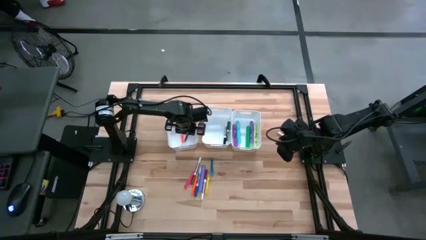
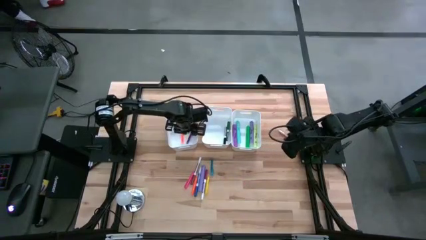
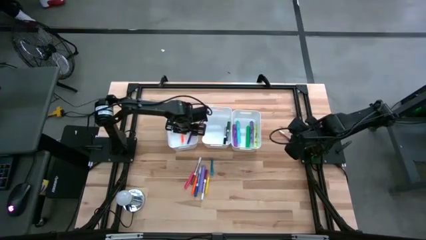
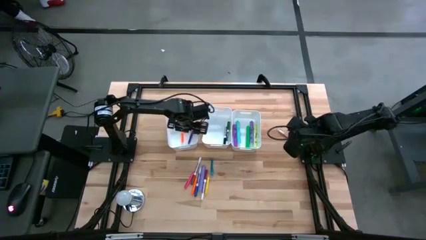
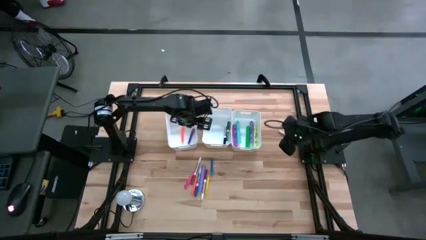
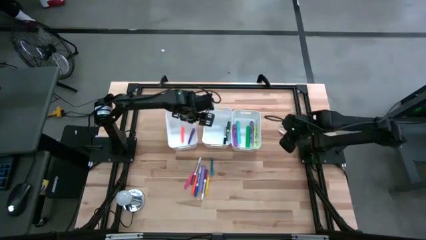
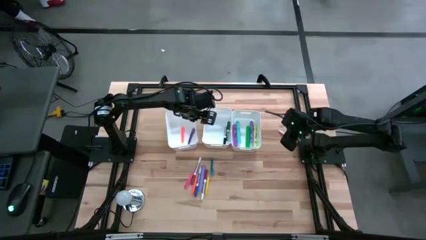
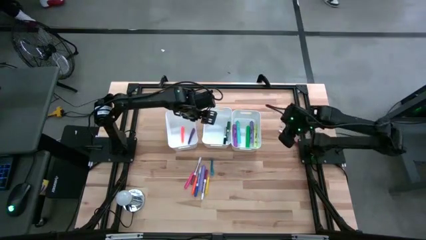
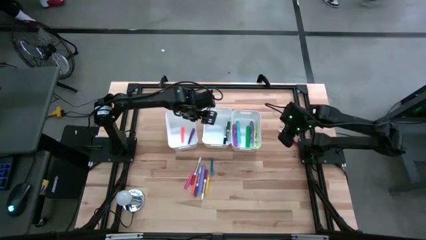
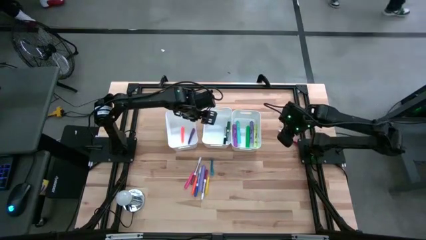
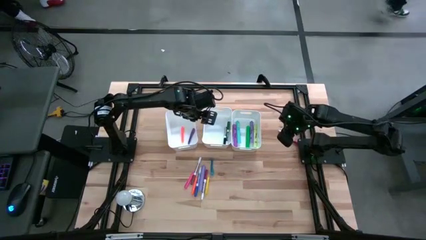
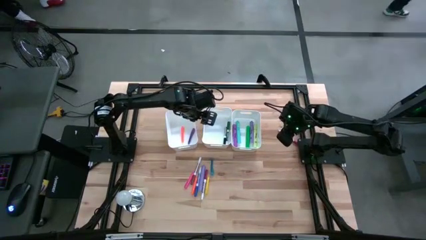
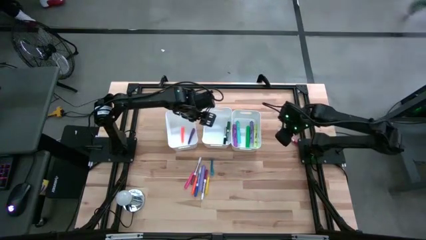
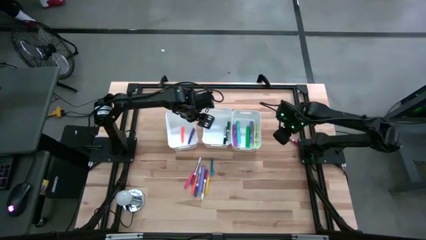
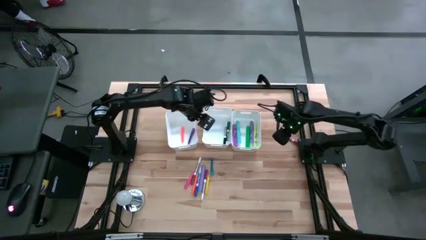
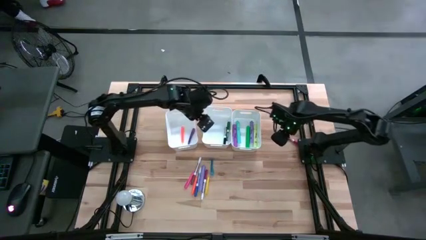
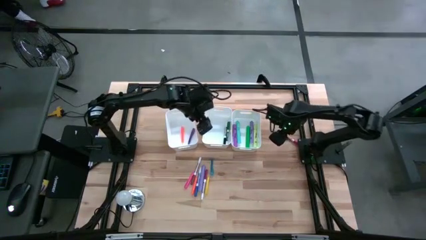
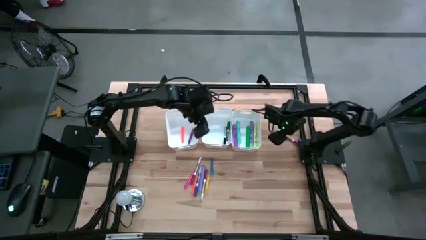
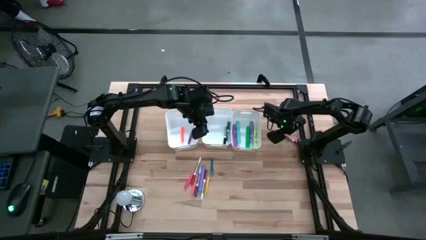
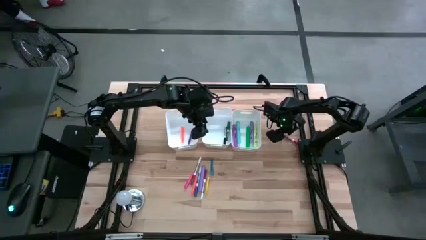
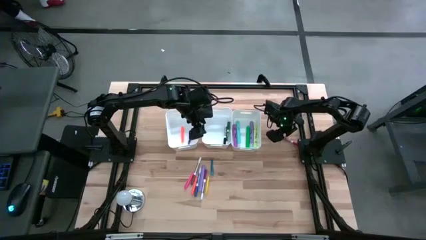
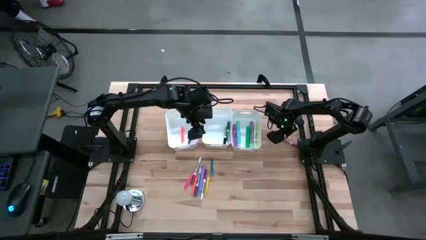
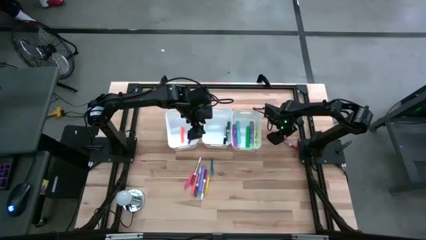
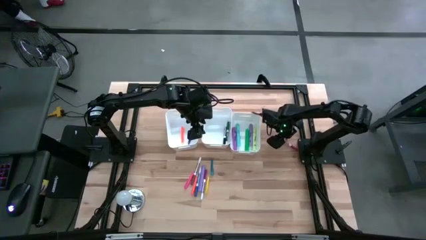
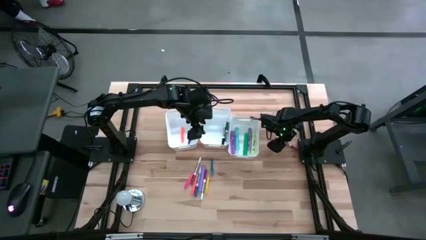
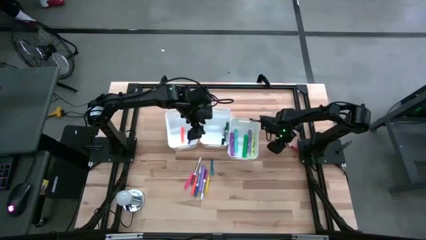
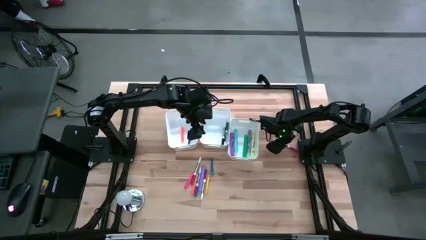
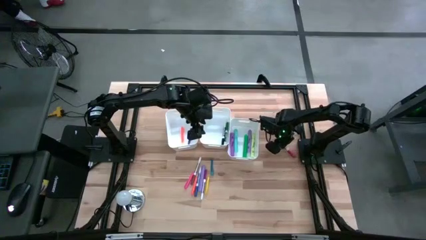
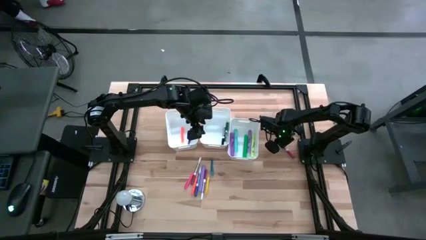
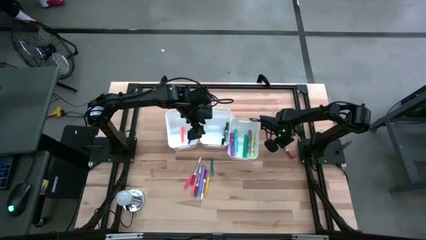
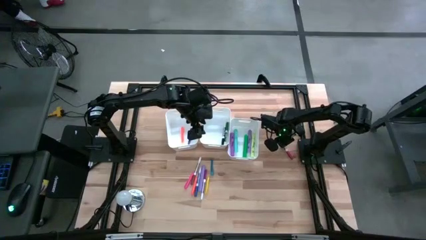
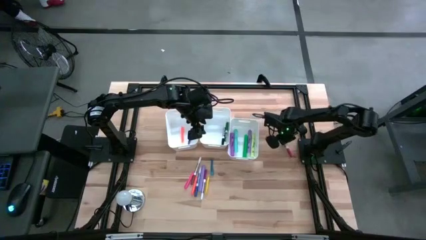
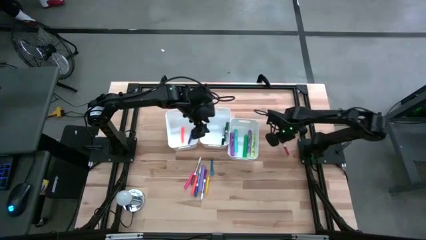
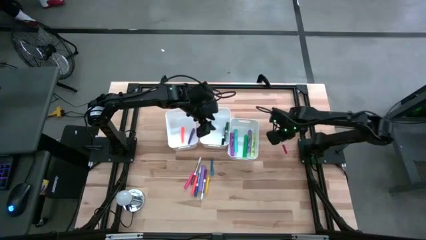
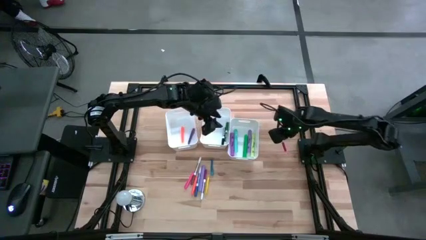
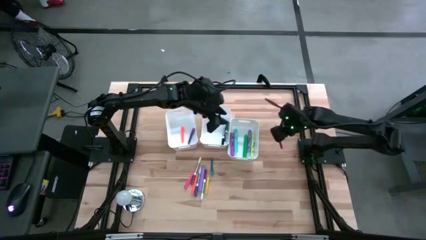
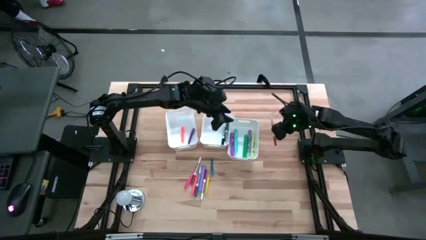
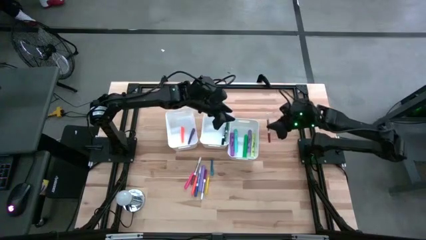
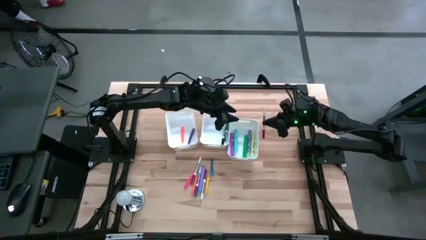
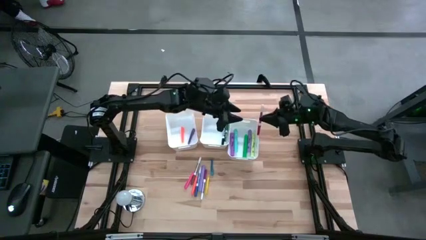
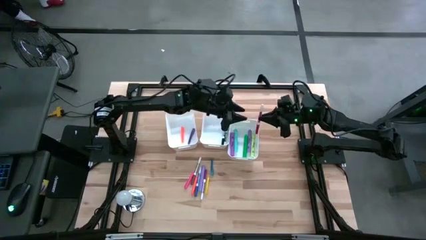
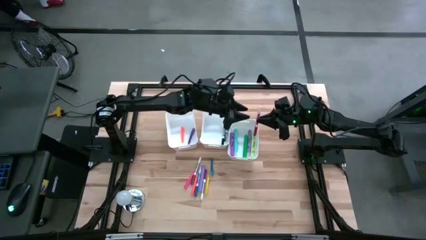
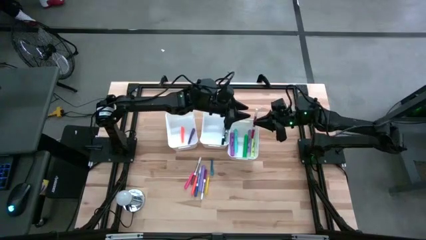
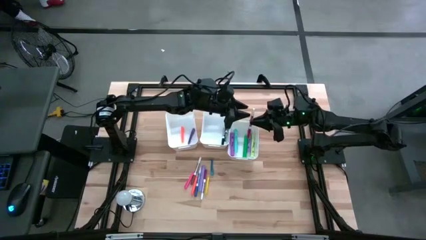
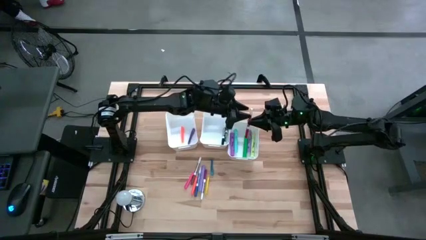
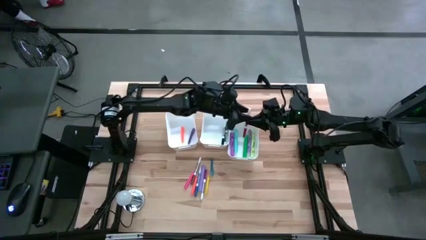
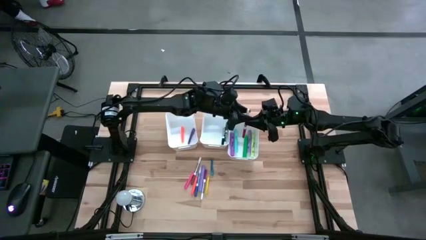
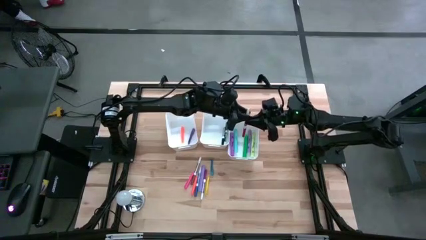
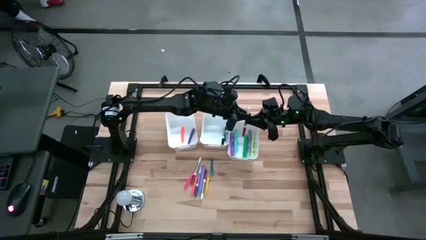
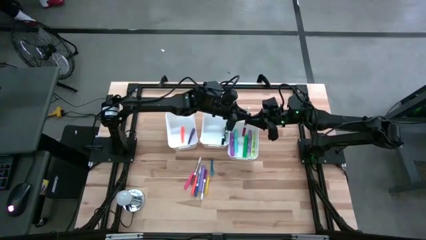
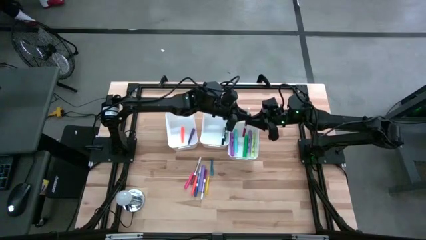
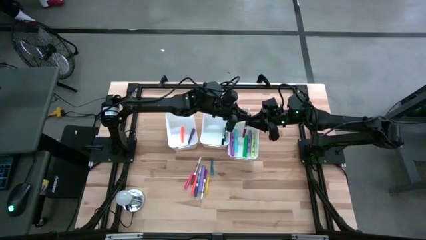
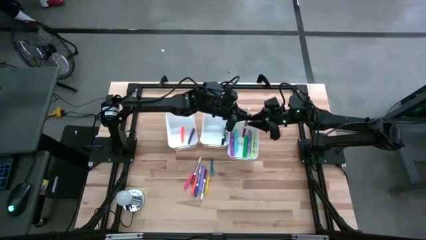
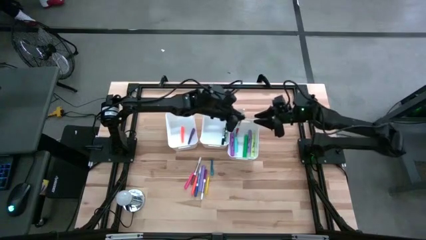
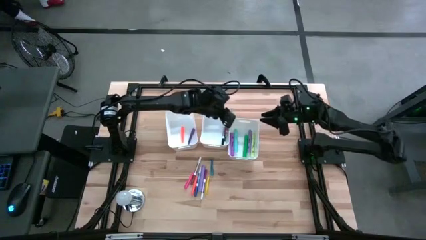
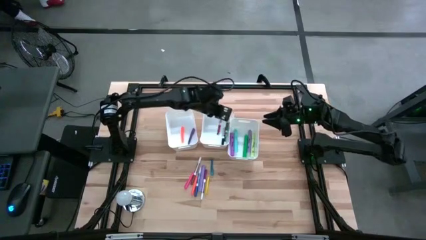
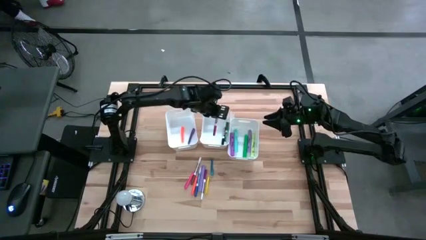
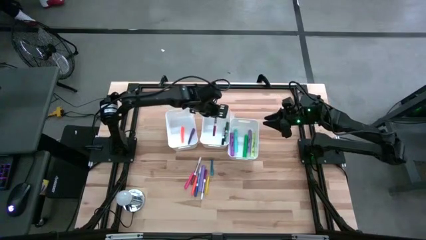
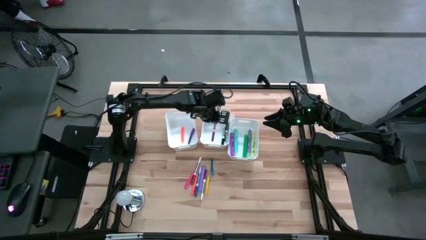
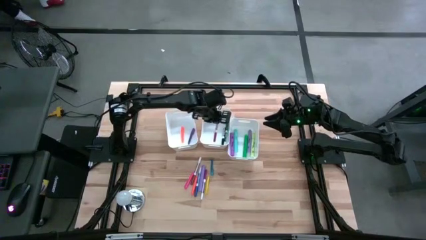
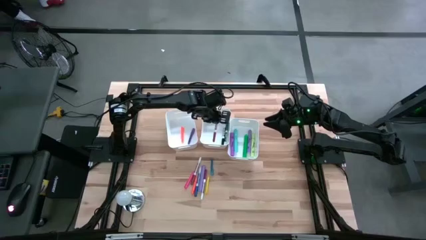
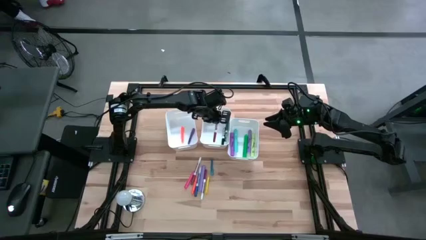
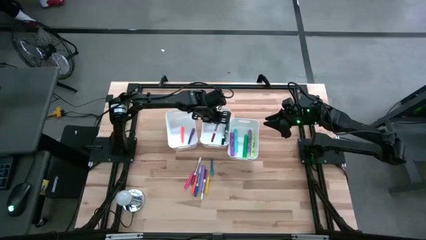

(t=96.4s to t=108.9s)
Task: Pick & Place Markers
Put the red marker into the middle white bin

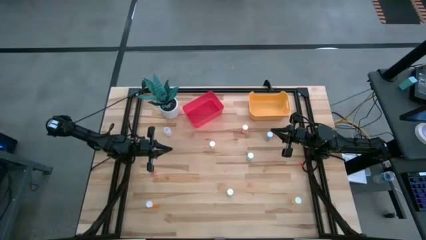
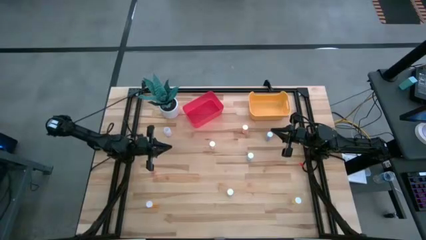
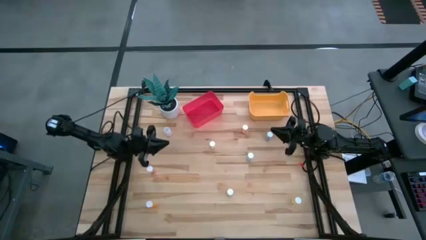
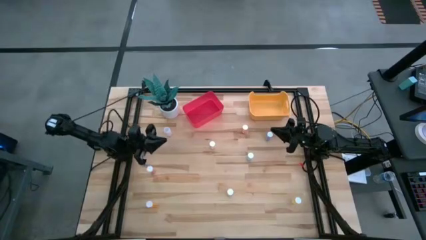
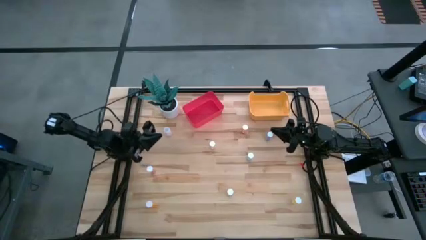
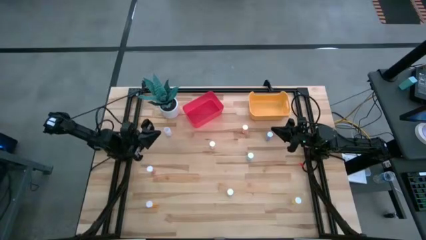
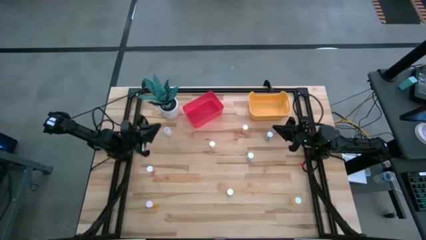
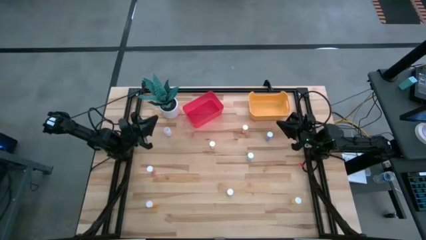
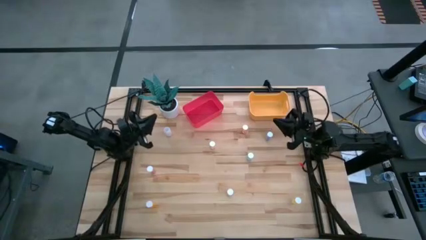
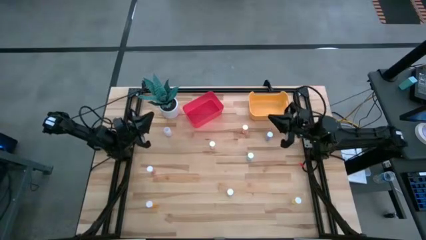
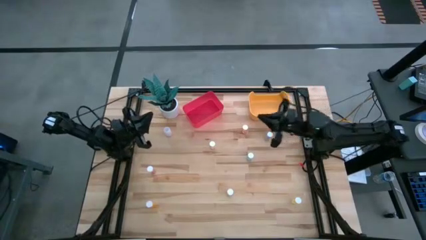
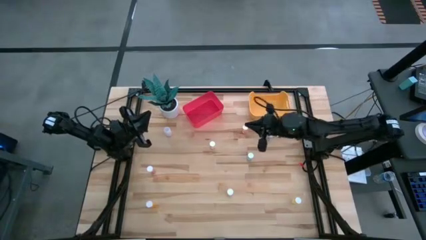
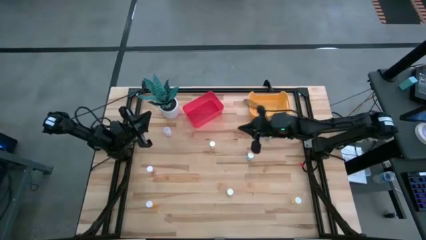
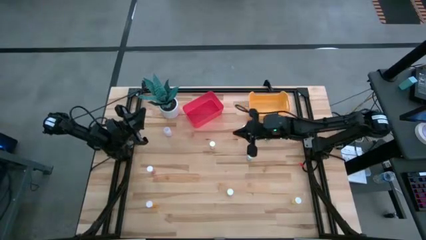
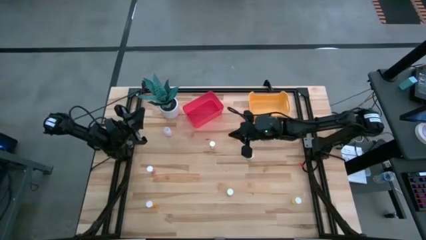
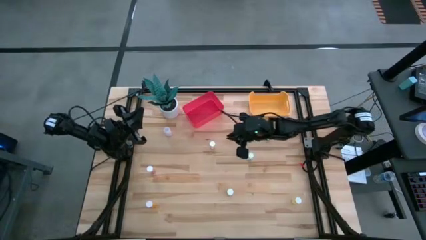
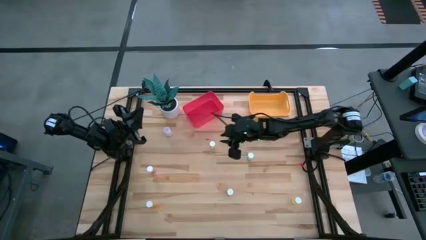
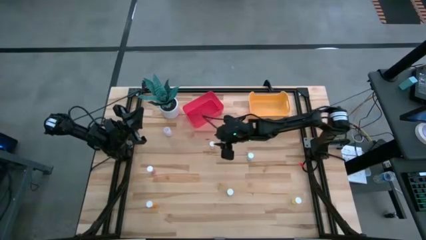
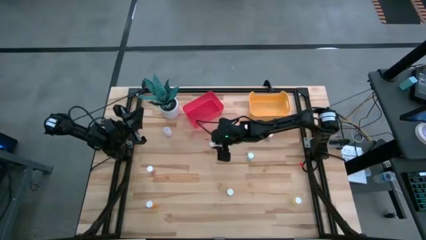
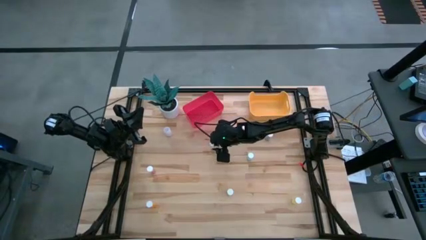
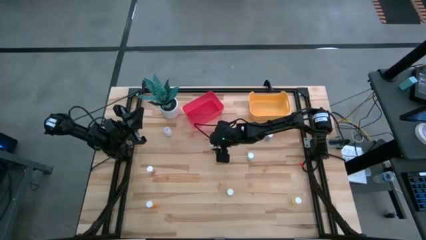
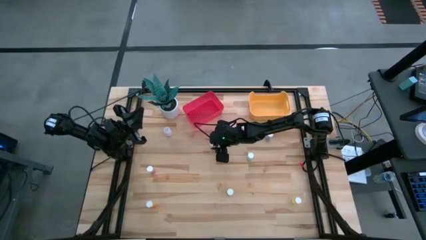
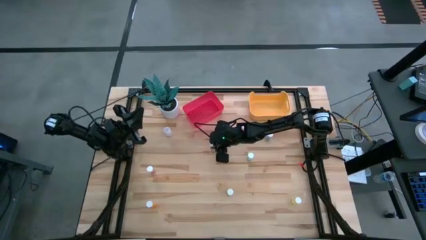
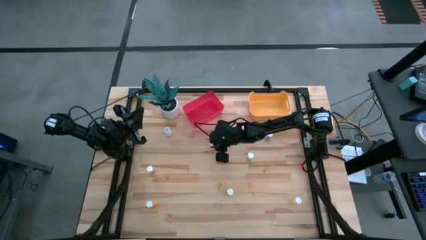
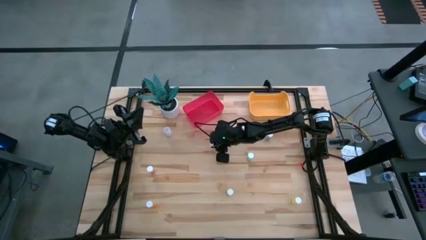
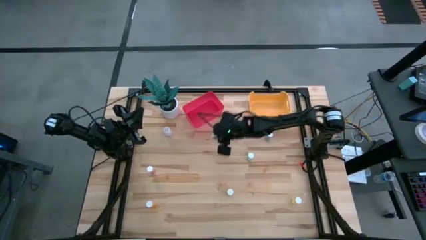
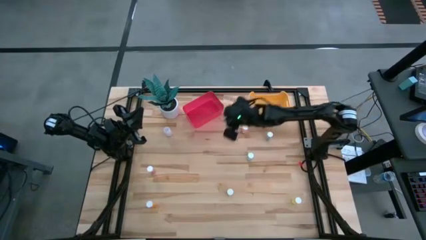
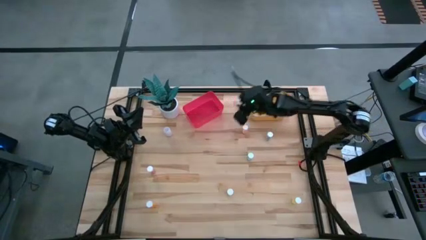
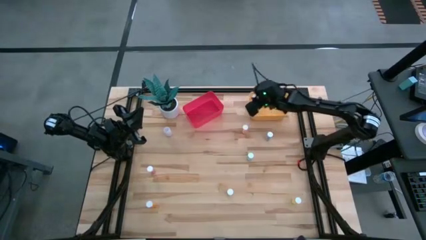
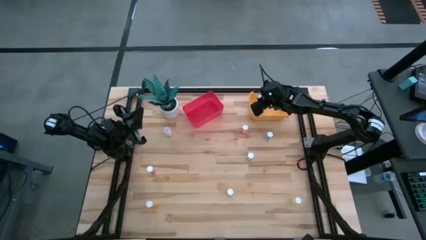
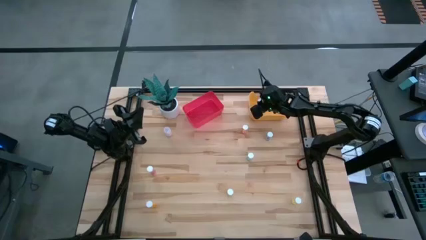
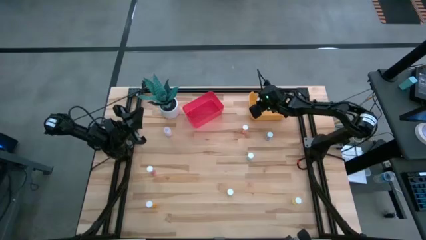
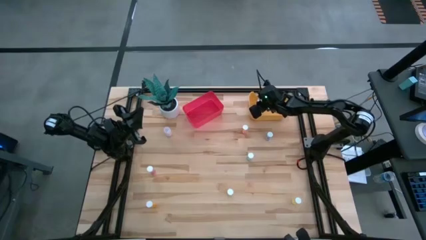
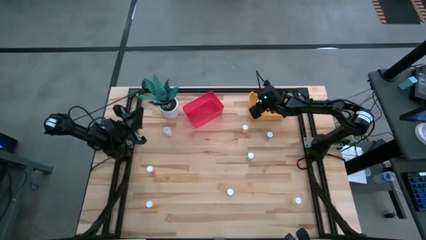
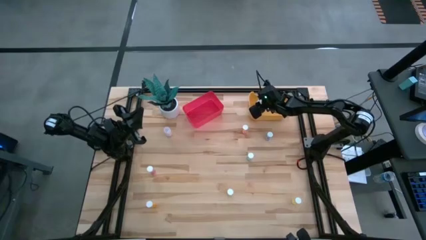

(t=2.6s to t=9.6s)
Task: Pick and place medicine bottles into bin by pill shape (circle, oval)
Put the yellow capsule bottle into the yellow bin
